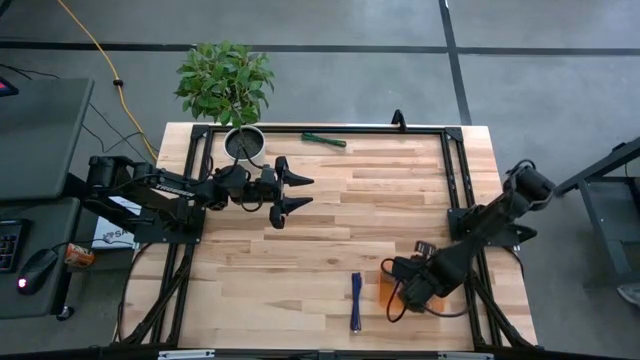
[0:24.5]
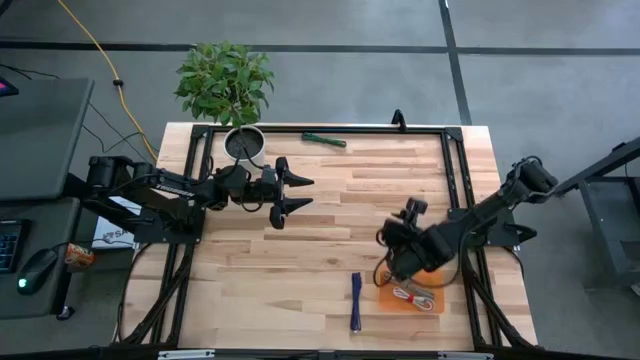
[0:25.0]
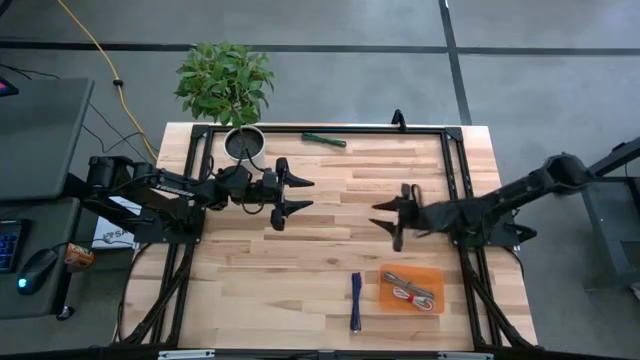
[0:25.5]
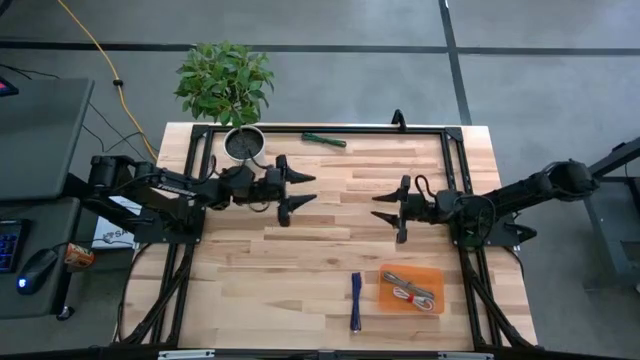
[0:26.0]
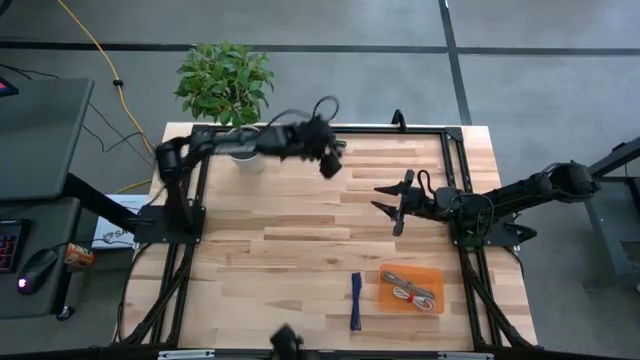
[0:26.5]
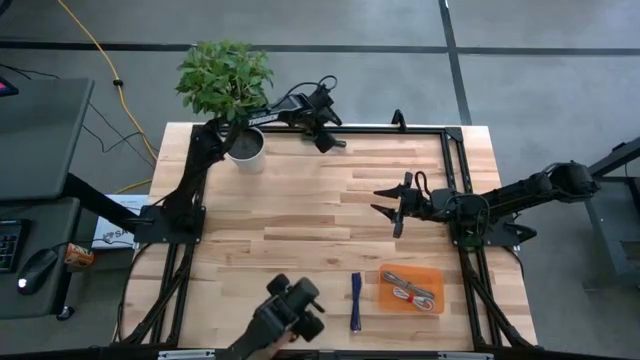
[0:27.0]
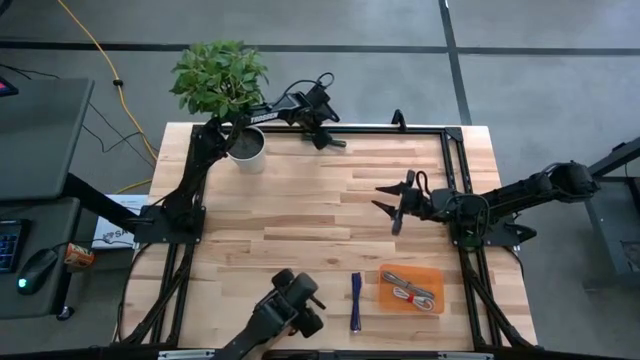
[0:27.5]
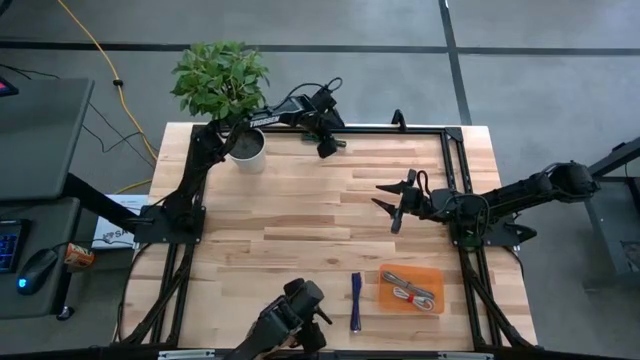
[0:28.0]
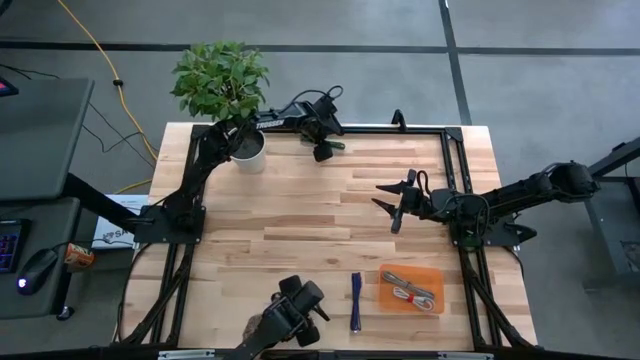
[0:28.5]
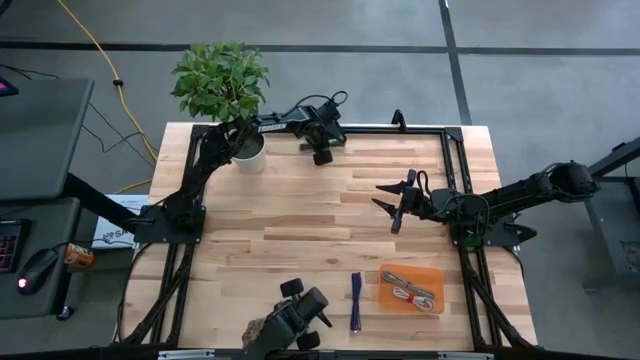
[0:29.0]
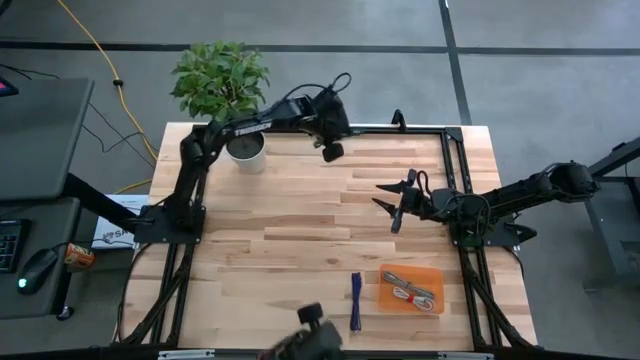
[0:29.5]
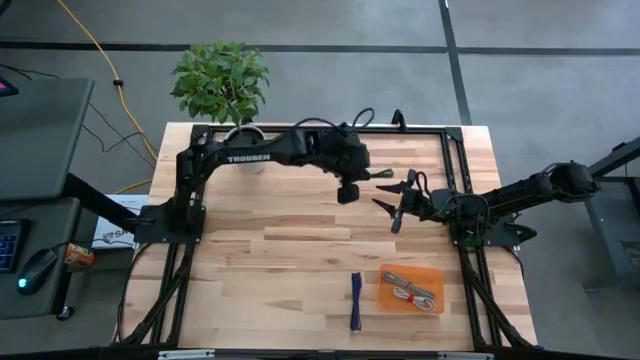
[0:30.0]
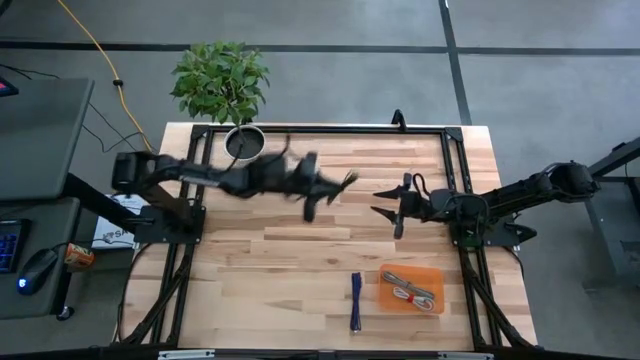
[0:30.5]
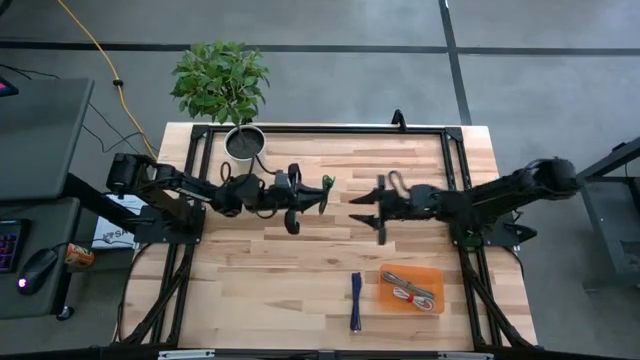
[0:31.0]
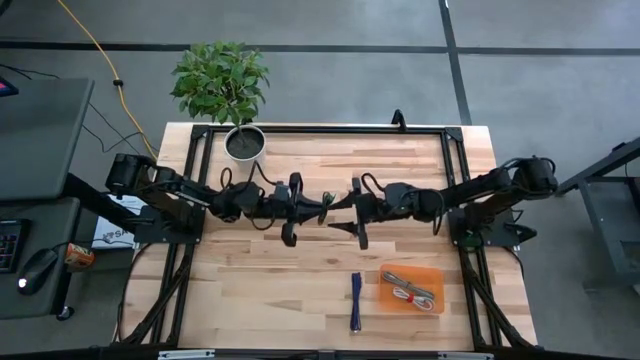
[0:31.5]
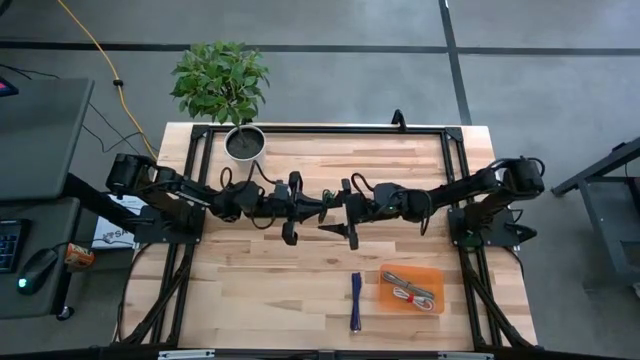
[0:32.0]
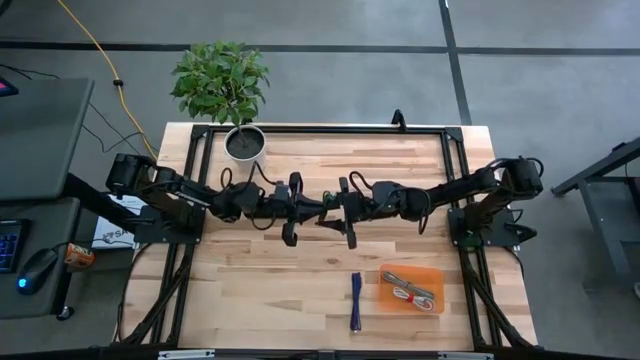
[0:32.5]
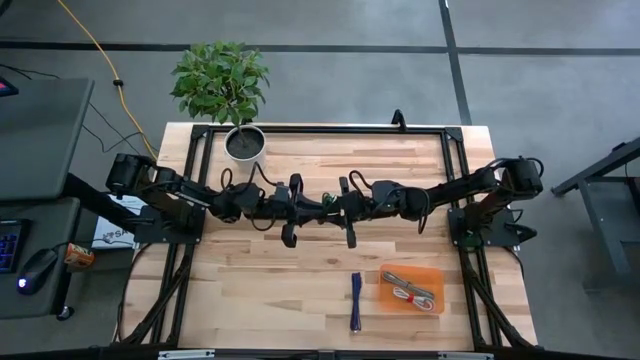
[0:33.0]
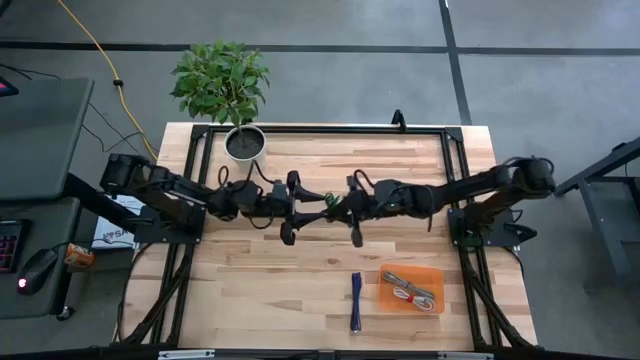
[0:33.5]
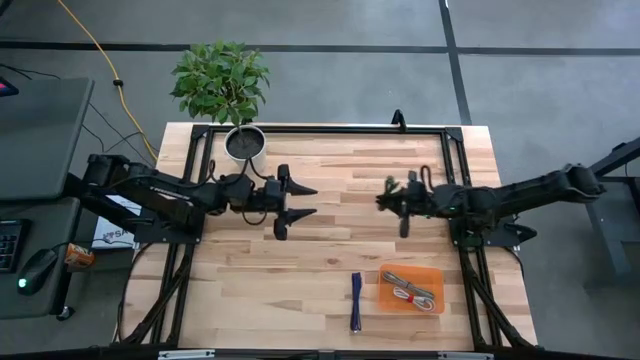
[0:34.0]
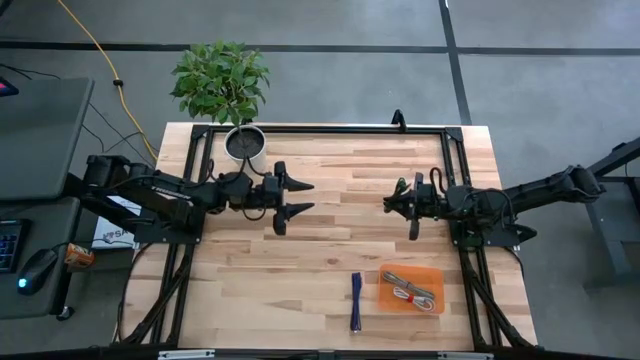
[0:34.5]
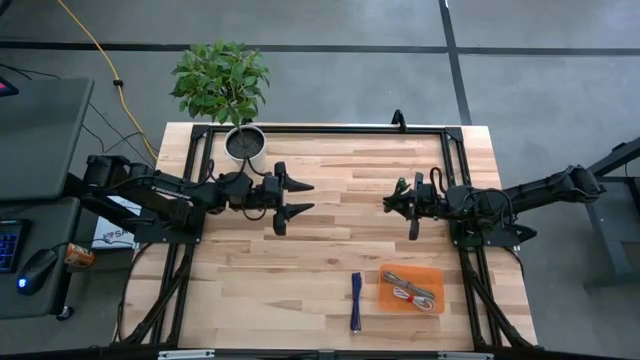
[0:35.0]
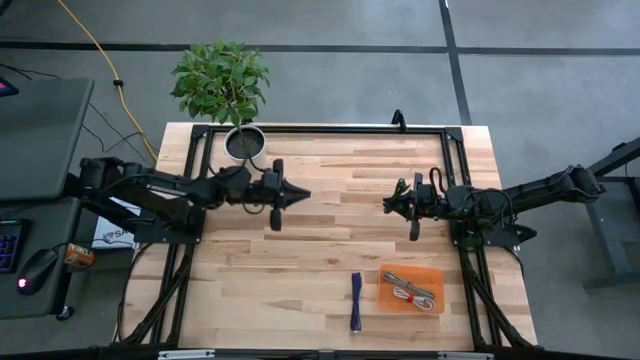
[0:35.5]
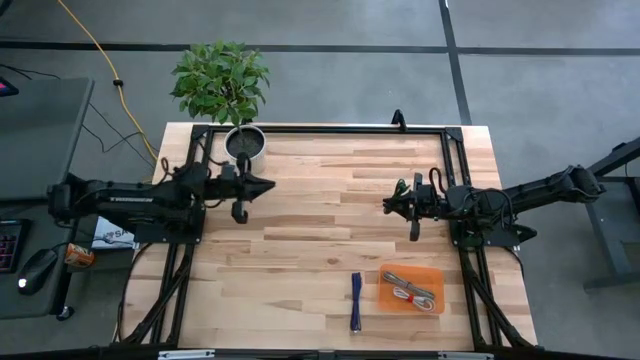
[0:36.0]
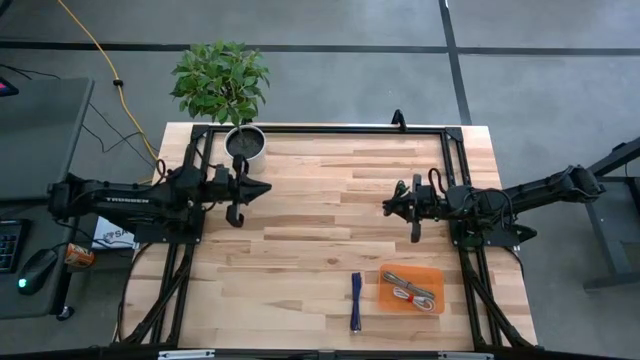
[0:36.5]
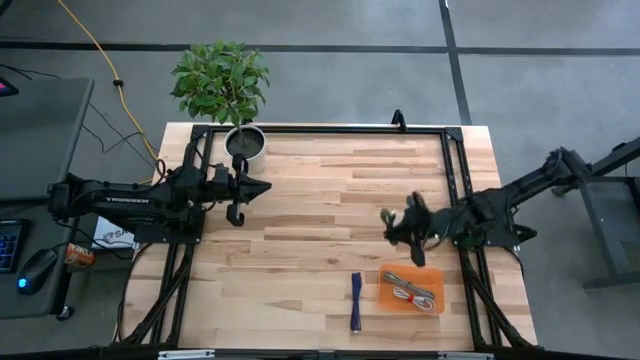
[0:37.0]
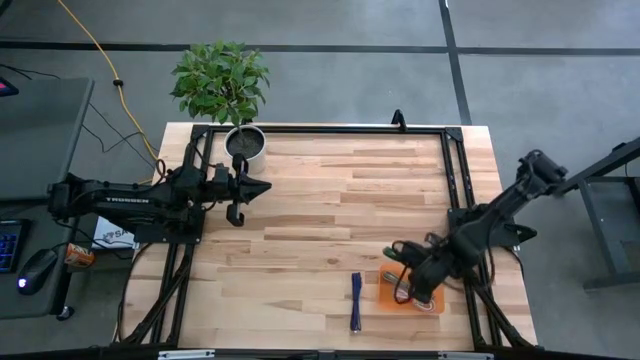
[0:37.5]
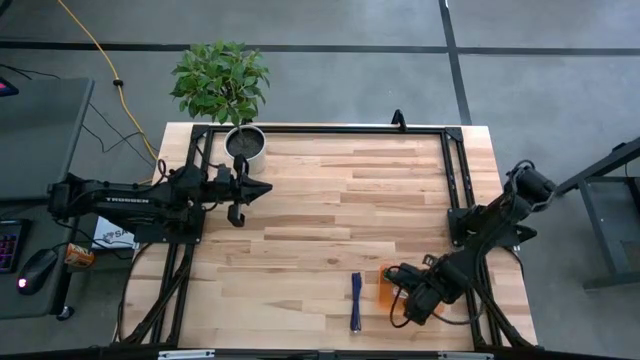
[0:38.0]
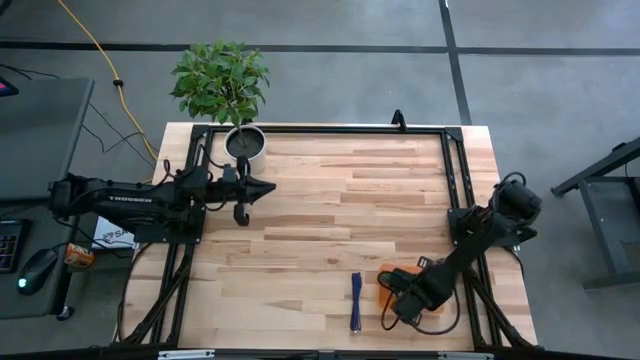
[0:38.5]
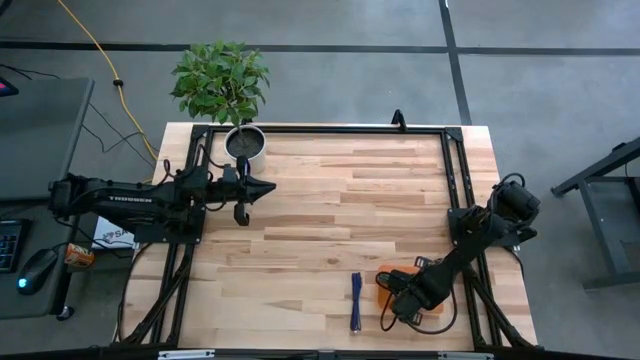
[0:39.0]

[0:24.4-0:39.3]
Task: Pick and place USB-C Cables
Put the green charger cable into the orange bin

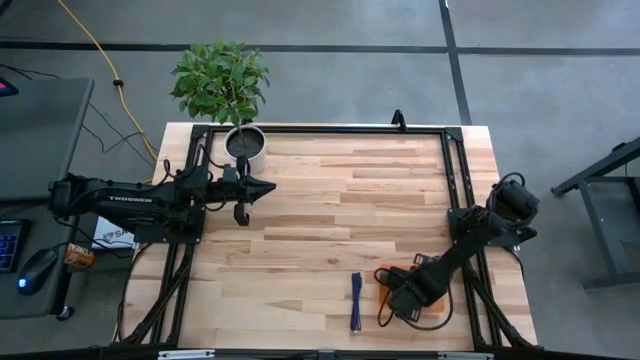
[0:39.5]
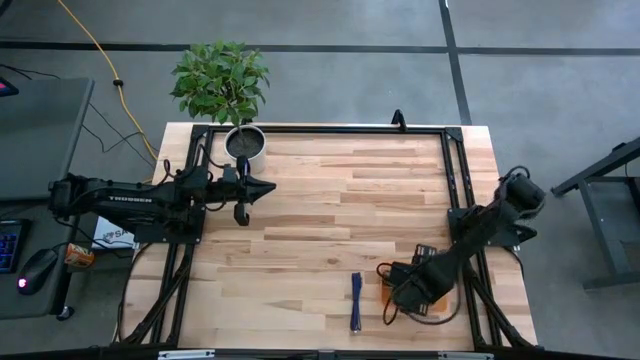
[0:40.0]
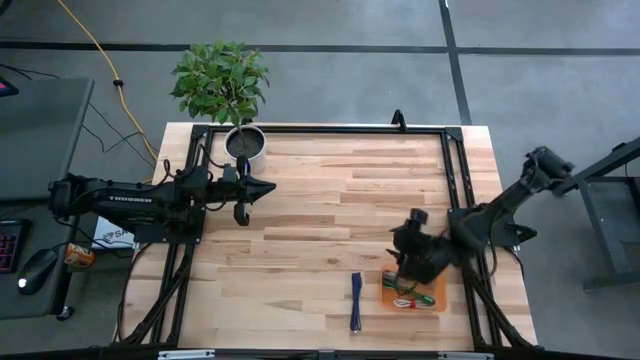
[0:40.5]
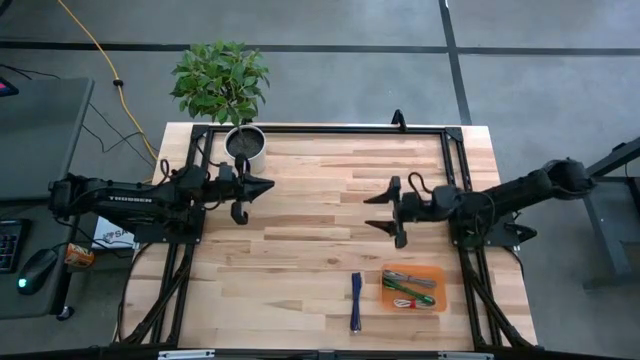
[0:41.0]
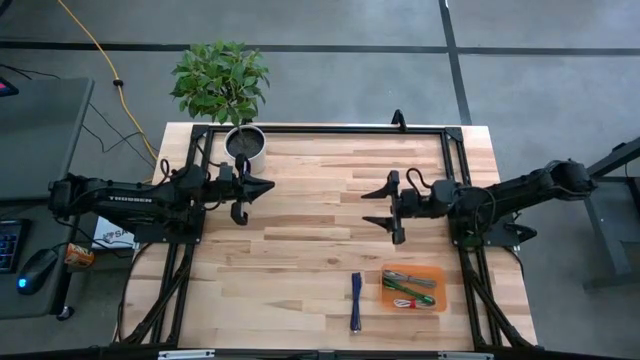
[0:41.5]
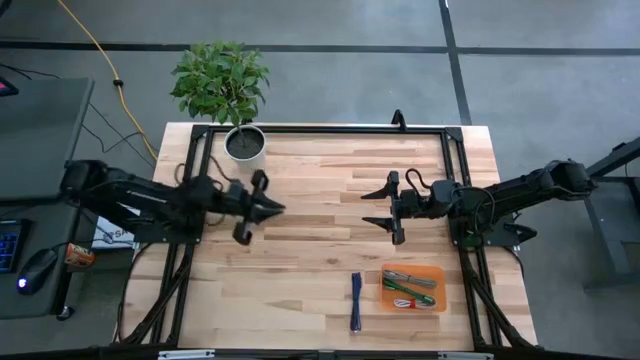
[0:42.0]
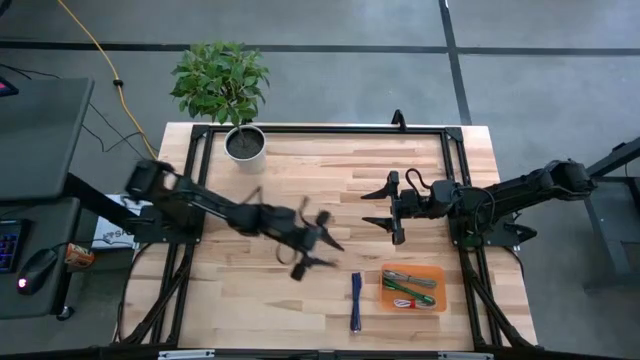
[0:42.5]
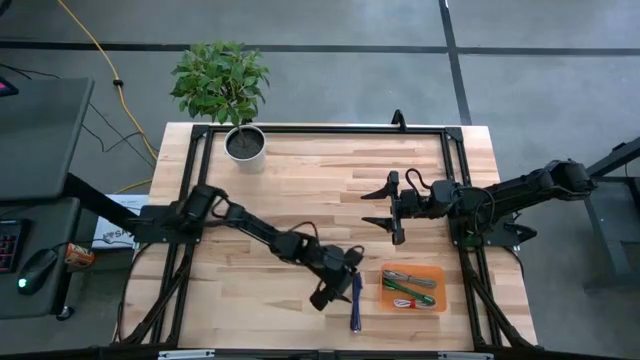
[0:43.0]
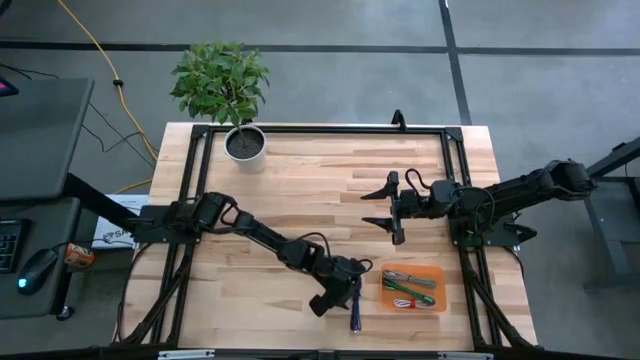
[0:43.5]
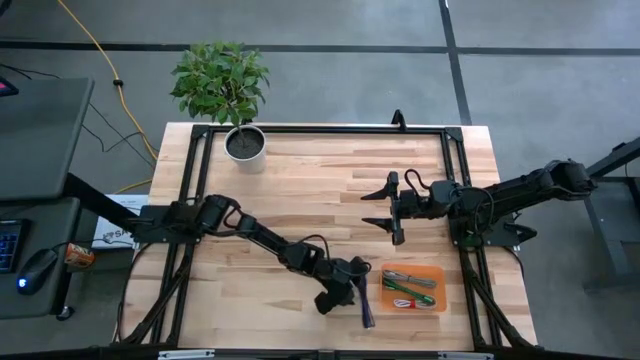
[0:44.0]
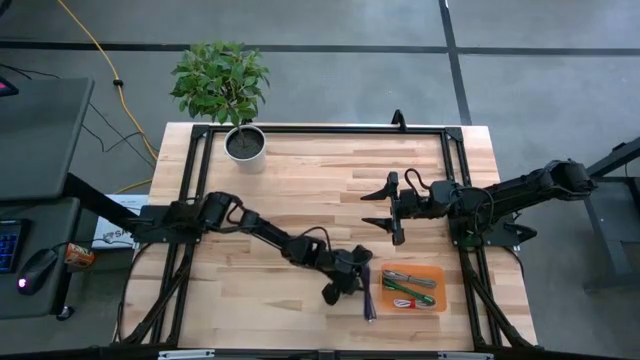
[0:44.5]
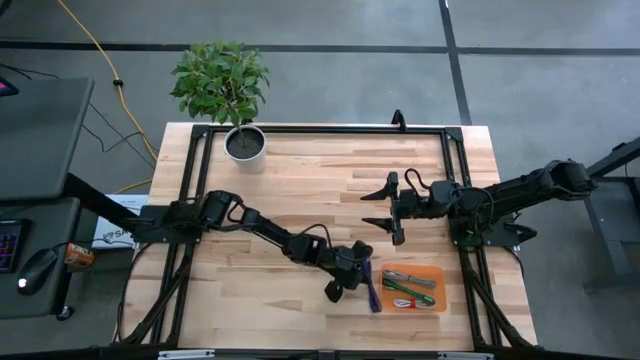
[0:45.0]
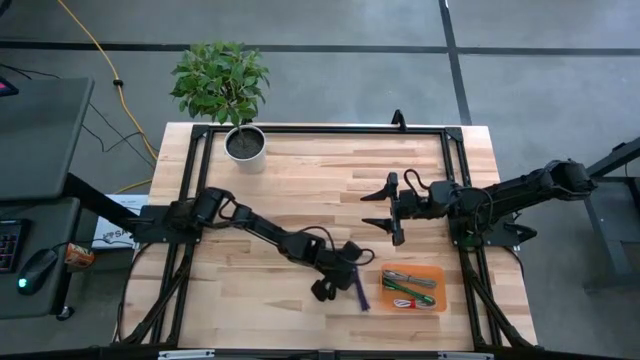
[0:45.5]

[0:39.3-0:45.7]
Put the blue charger cable into the orange bin
